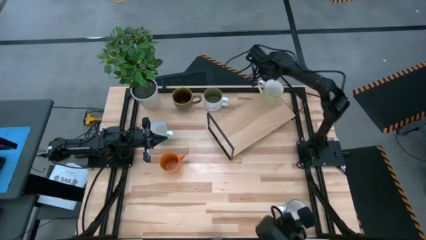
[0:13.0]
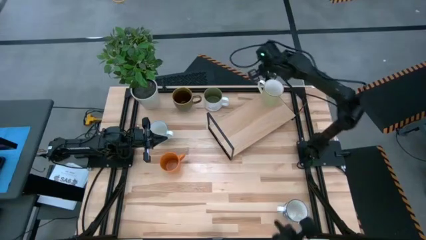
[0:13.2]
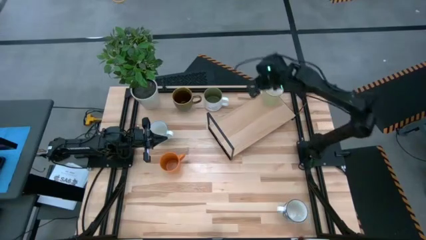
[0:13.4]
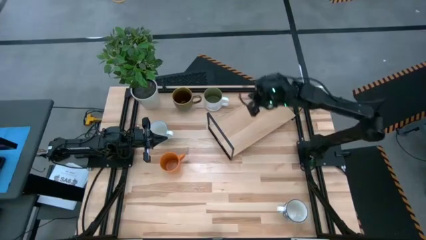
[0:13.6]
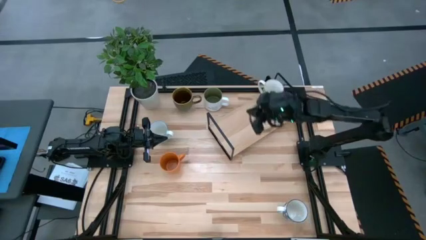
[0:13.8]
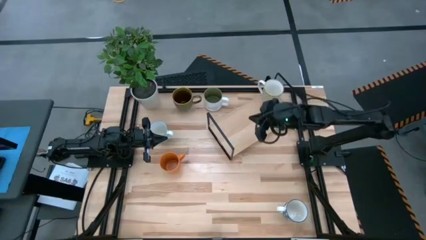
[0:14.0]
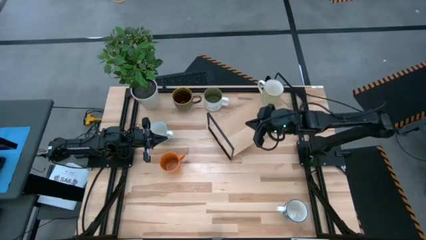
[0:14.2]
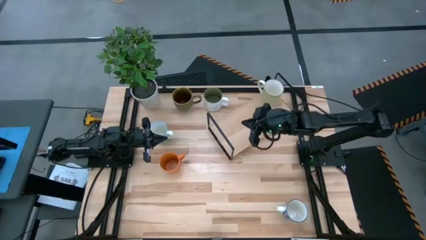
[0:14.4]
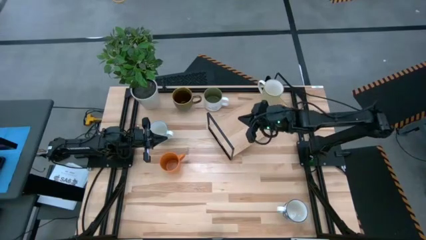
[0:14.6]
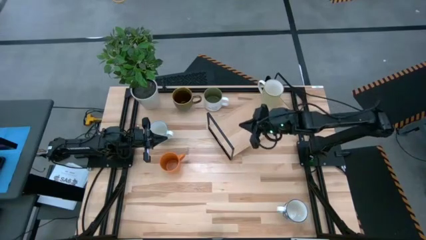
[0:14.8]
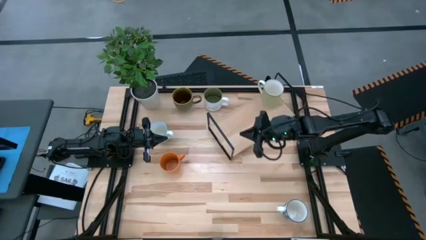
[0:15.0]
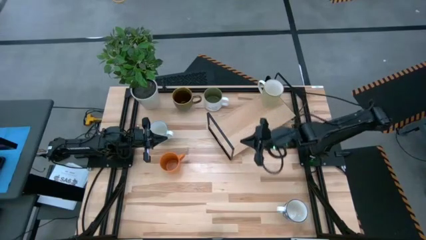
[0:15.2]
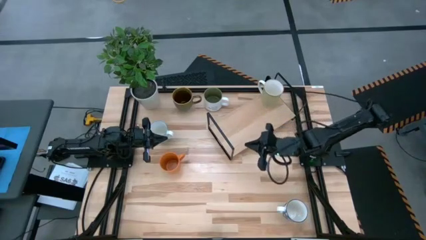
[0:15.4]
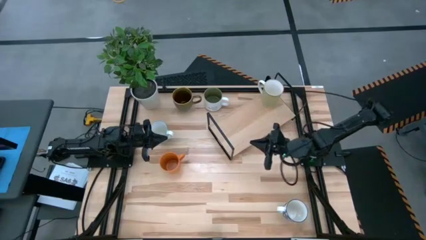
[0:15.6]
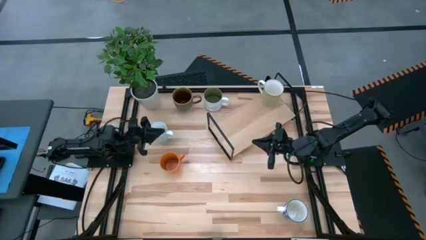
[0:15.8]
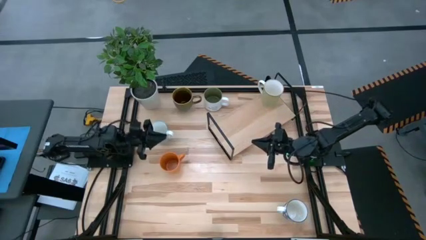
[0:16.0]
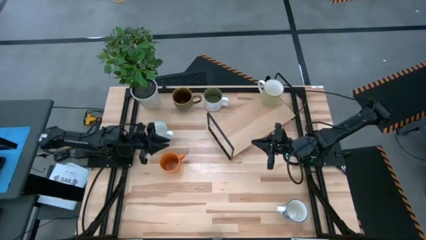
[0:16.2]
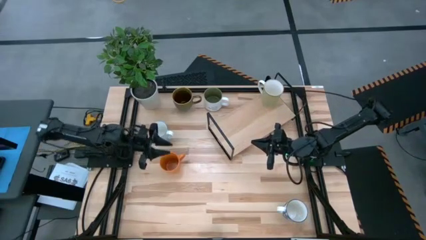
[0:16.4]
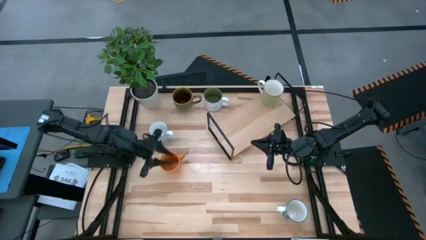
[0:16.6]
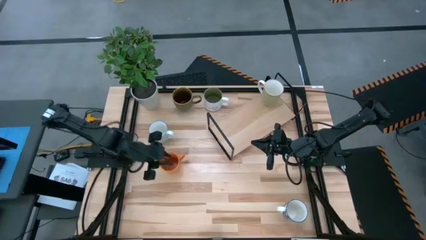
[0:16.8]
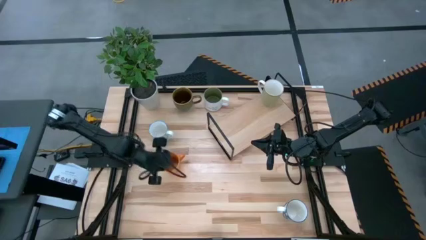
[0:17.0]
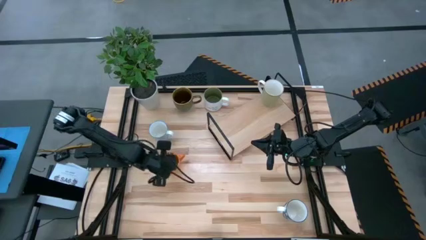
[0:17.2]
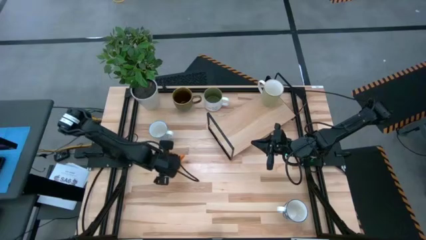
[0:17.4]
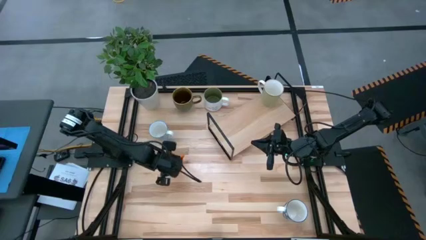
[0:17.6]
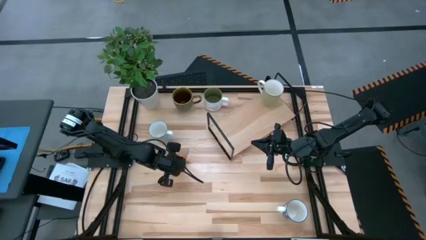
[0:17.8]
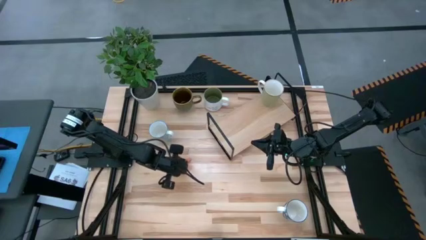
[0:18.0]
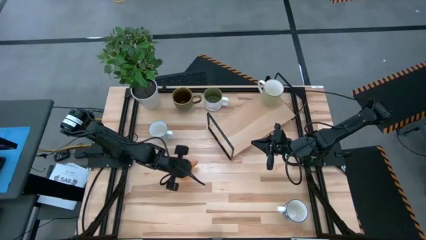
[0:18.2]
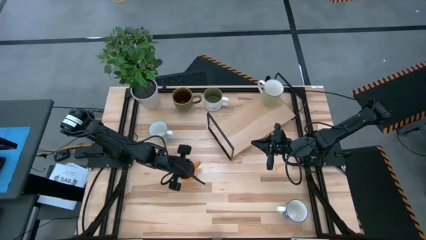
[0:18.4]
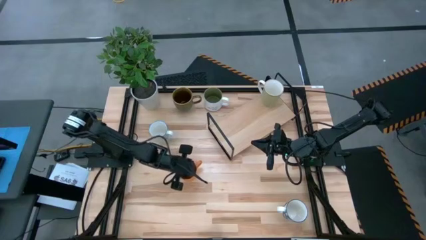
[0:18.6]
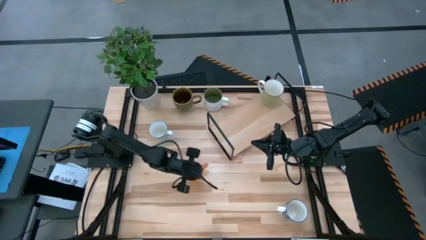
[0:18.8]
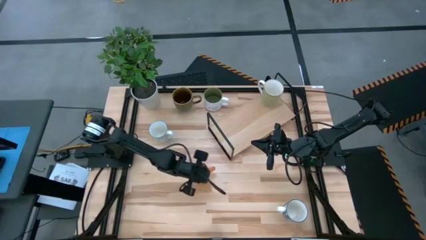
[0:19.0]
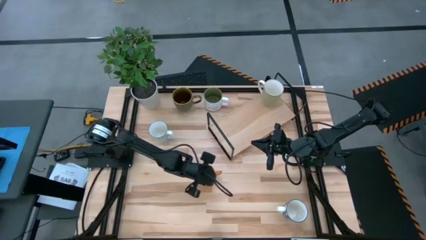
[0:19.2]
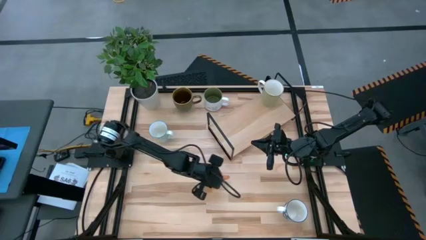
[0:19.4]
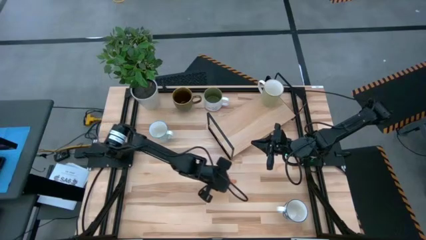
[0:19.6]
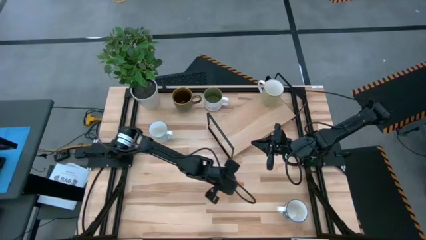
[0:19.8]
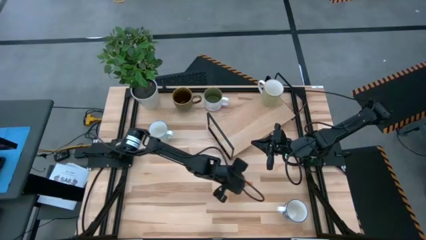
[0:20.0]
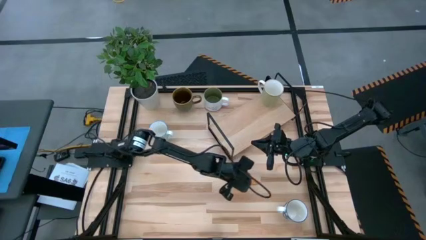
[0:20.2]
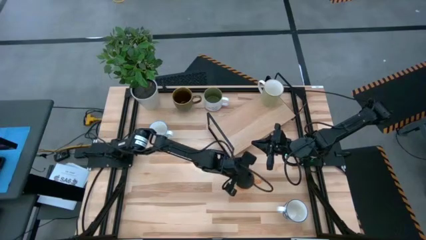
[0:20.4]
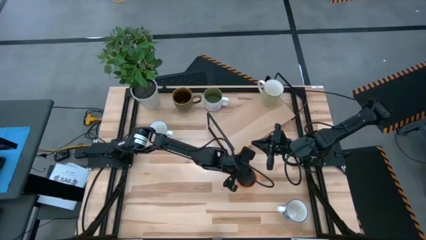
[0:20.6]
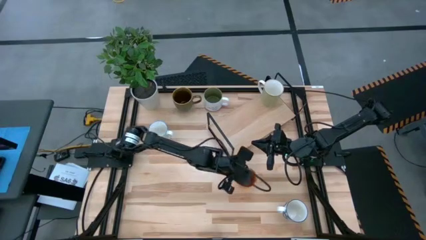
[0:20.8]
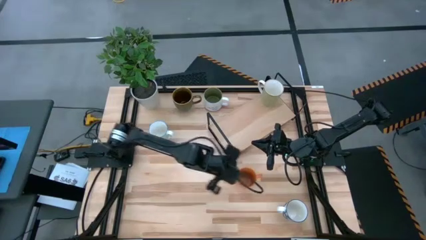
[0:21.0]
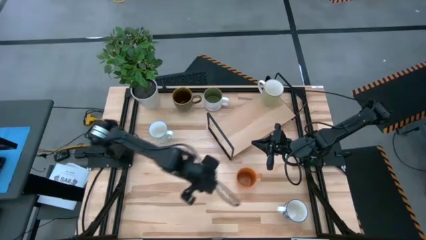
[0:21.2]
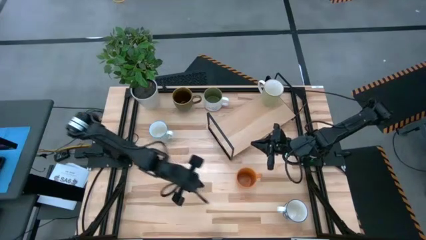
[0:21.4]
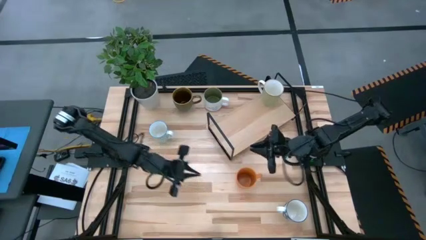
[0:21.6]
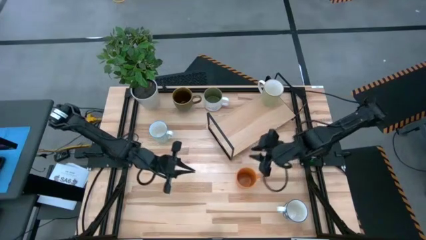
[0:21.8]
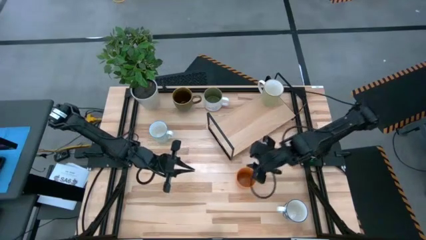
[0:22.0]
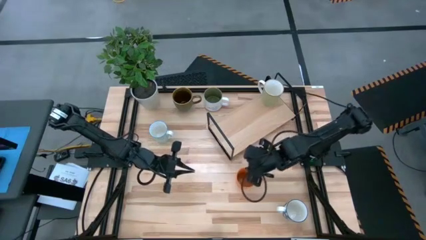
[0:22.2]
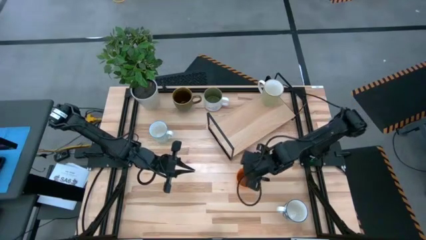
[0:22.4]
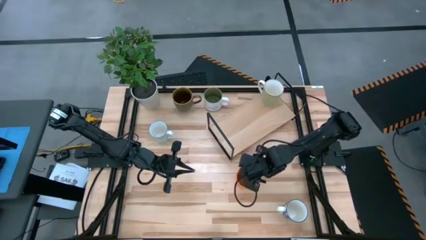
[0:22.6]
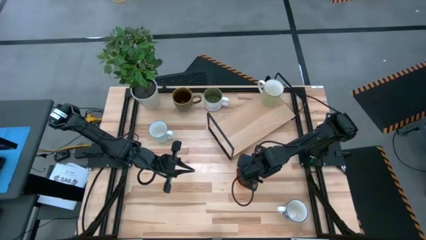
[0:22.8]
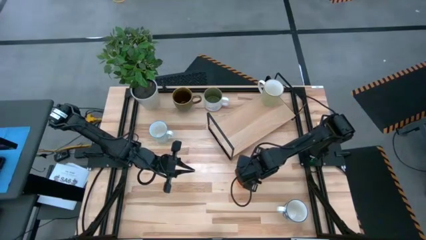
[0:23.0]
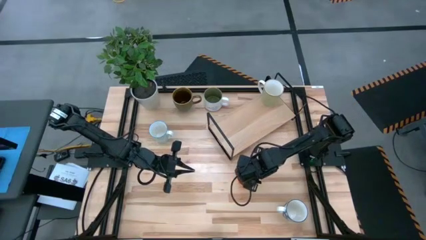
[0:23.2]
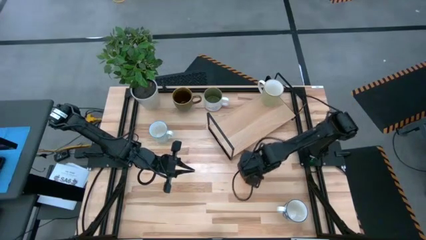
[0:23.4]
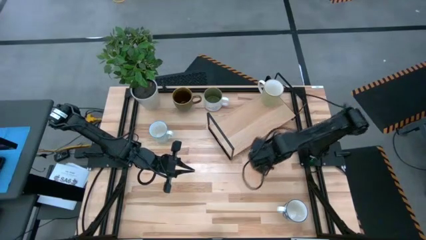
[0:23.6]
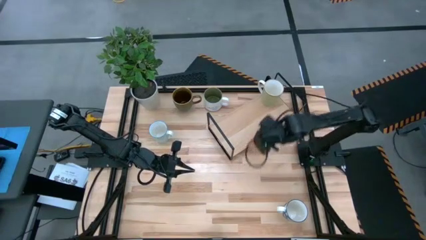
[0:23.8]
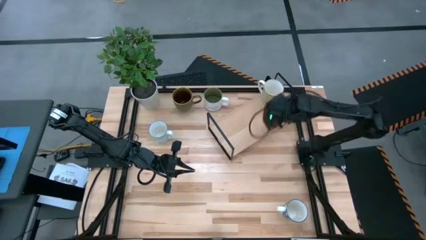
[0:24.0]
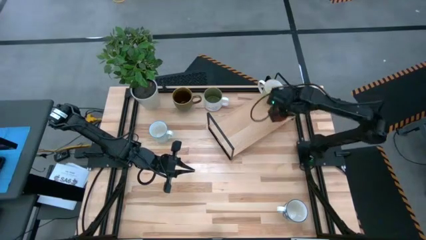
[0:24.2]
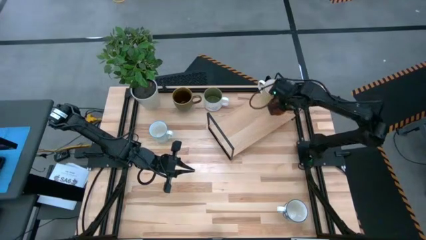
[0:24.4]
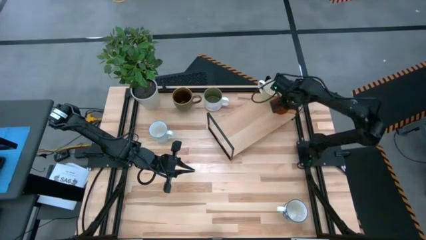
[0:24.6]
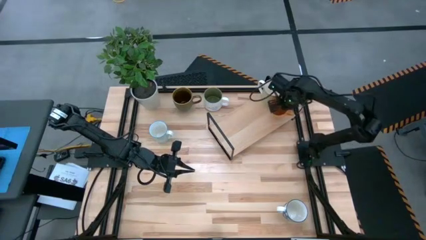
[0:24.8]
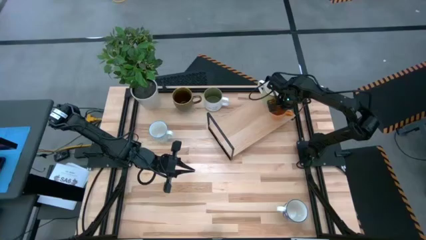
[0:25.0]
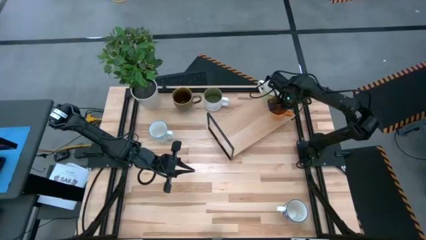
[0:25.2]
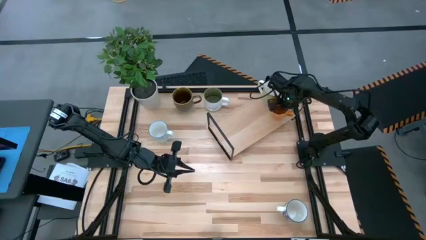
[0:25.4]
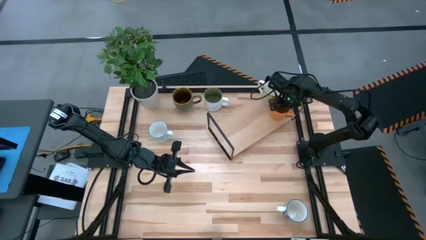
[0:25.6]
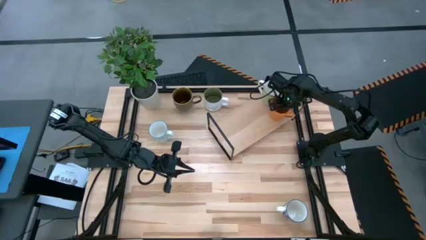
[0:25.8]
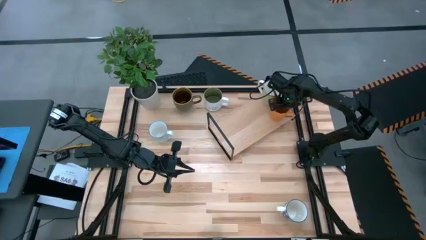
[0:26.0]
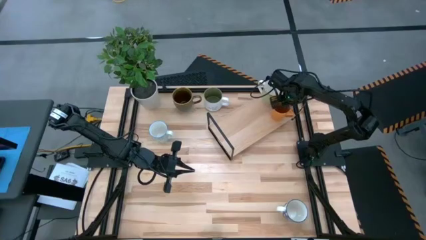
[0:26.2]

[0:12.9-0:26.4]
Task: Place coffee mugs
Put the orange mug on the shelf
